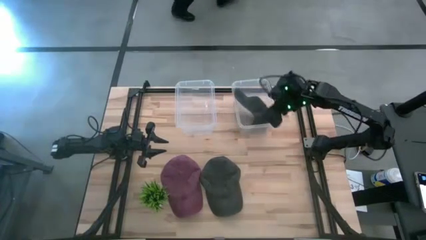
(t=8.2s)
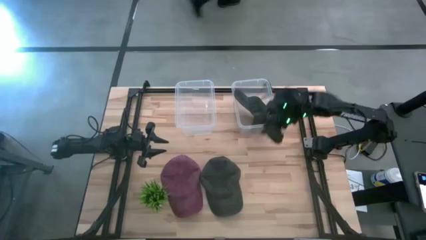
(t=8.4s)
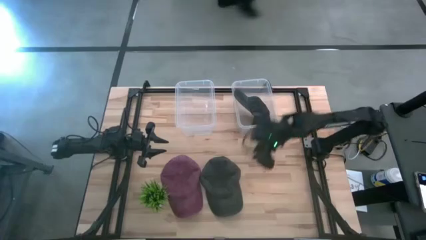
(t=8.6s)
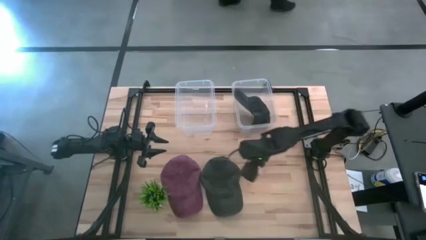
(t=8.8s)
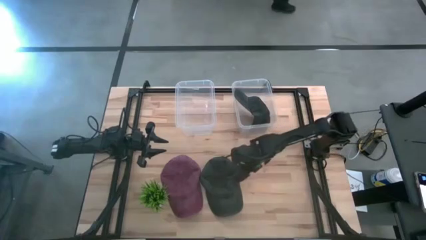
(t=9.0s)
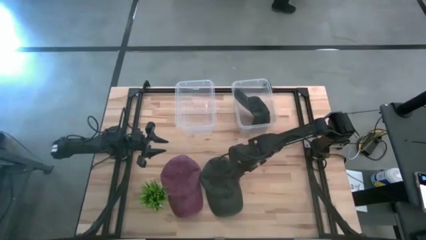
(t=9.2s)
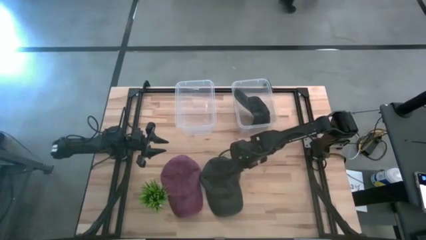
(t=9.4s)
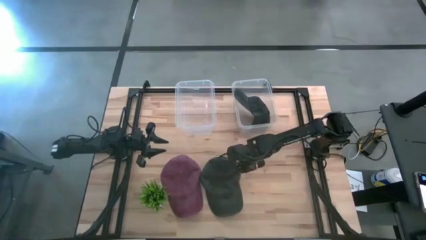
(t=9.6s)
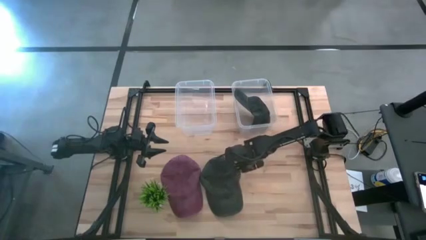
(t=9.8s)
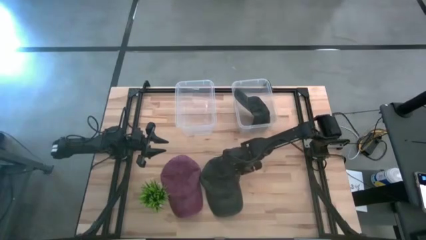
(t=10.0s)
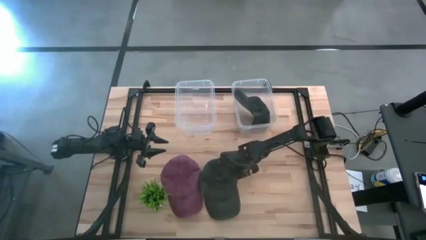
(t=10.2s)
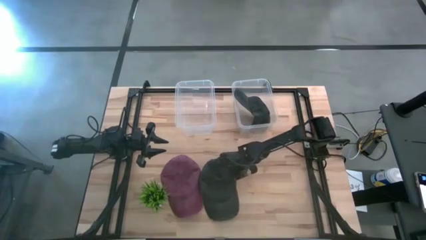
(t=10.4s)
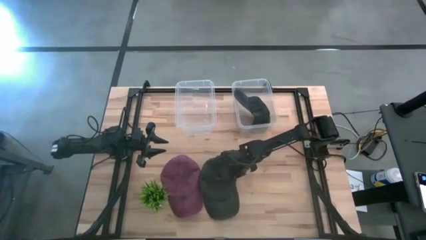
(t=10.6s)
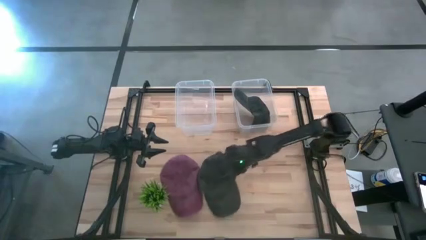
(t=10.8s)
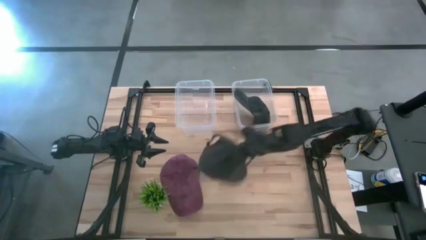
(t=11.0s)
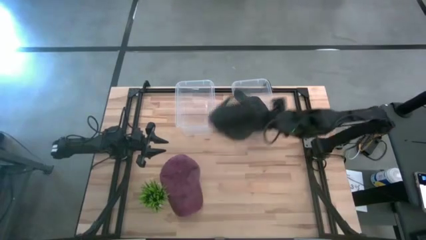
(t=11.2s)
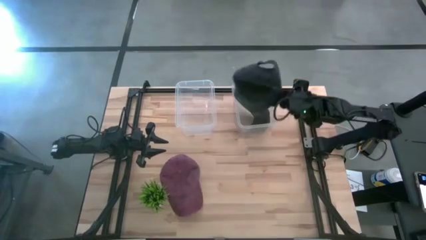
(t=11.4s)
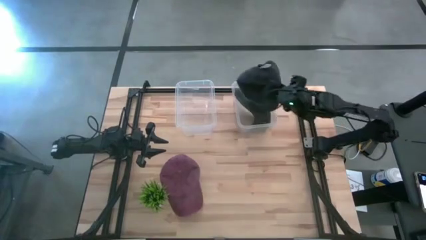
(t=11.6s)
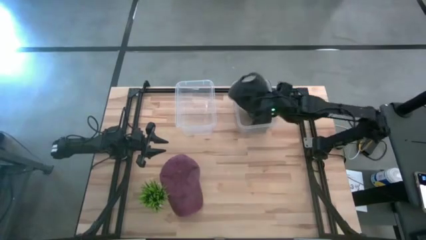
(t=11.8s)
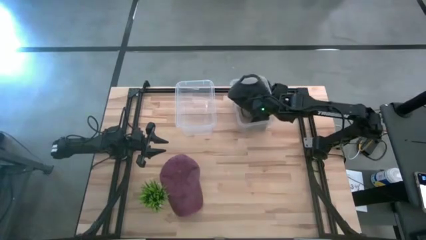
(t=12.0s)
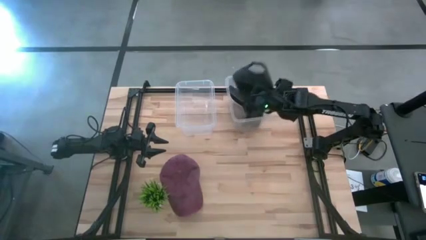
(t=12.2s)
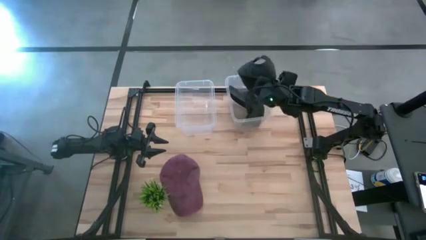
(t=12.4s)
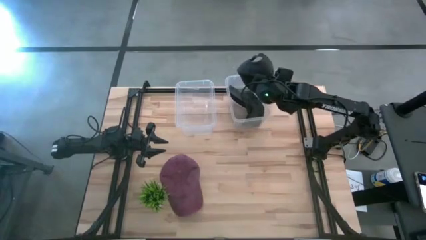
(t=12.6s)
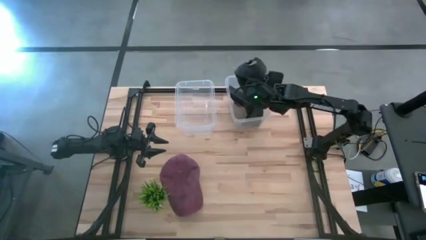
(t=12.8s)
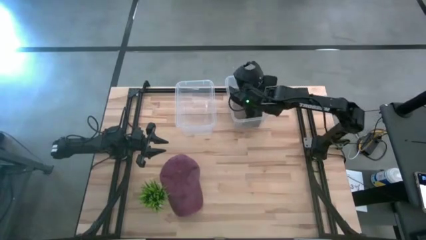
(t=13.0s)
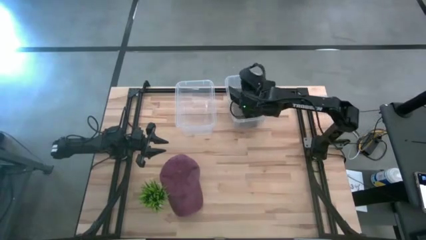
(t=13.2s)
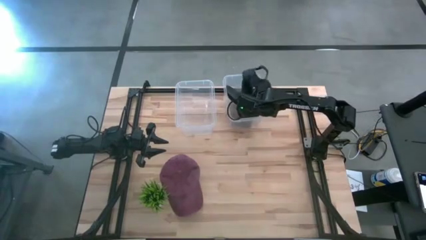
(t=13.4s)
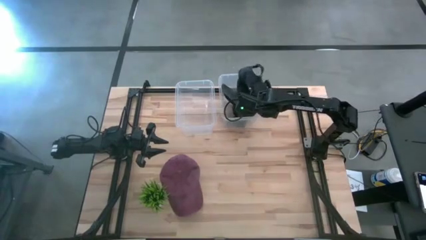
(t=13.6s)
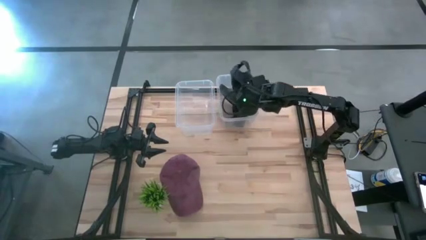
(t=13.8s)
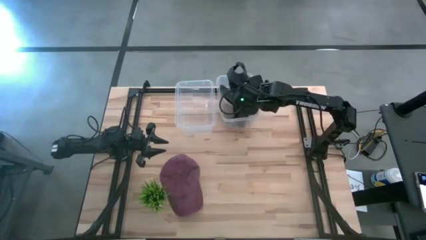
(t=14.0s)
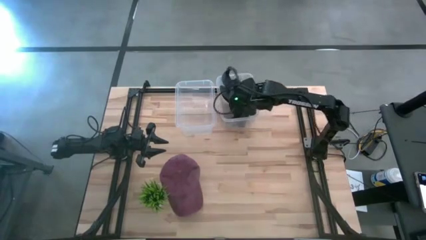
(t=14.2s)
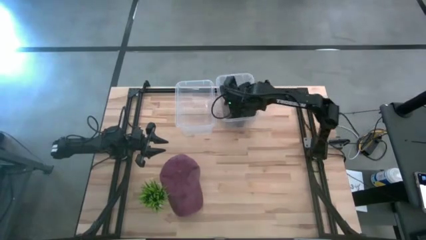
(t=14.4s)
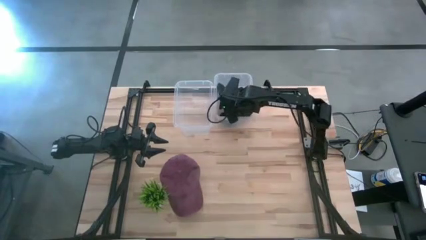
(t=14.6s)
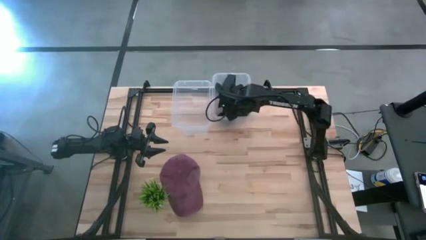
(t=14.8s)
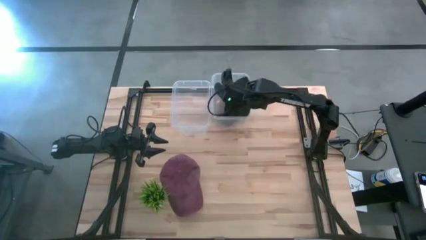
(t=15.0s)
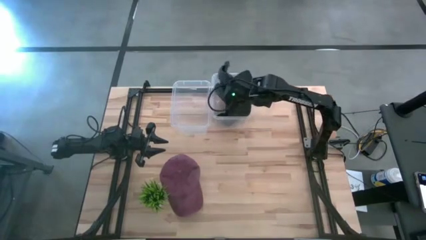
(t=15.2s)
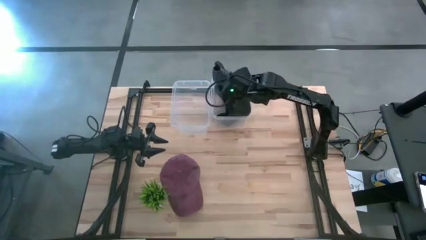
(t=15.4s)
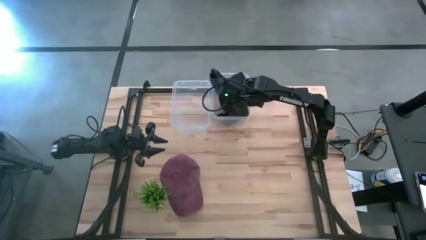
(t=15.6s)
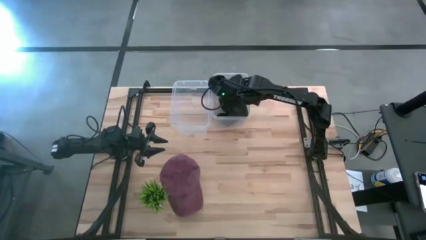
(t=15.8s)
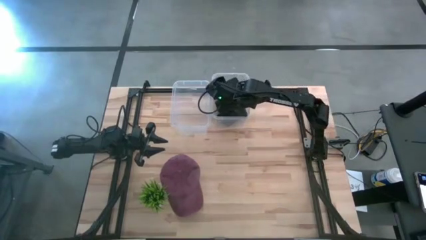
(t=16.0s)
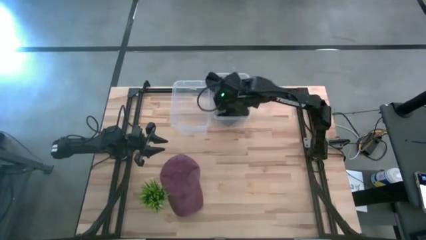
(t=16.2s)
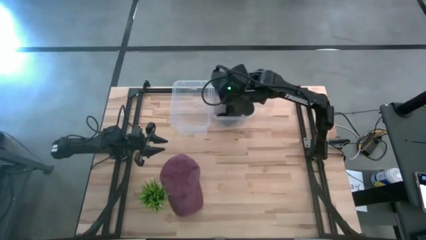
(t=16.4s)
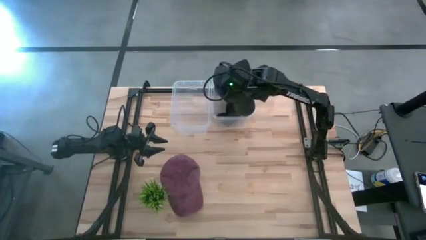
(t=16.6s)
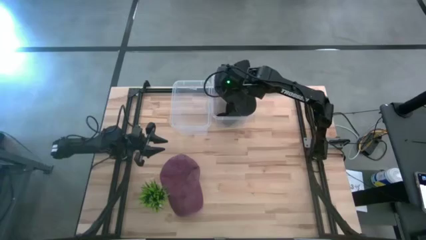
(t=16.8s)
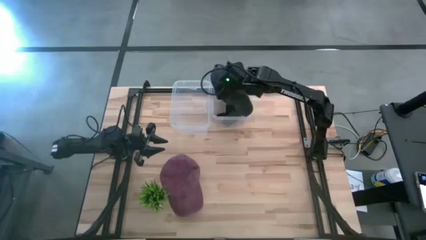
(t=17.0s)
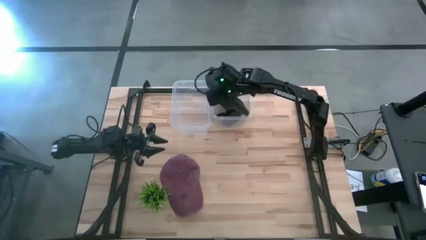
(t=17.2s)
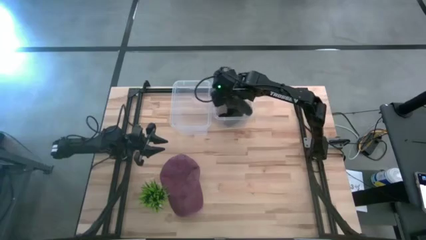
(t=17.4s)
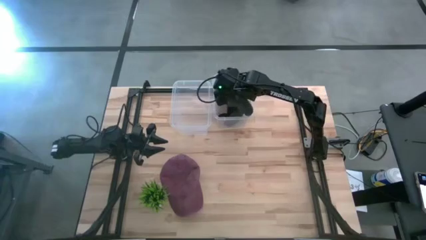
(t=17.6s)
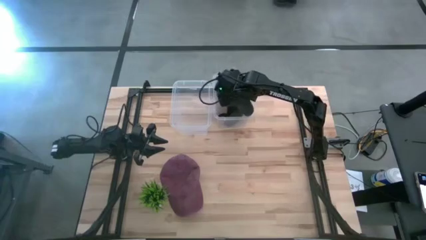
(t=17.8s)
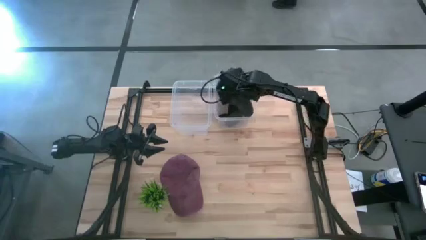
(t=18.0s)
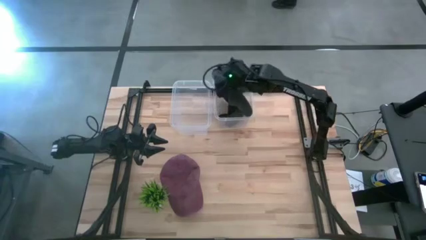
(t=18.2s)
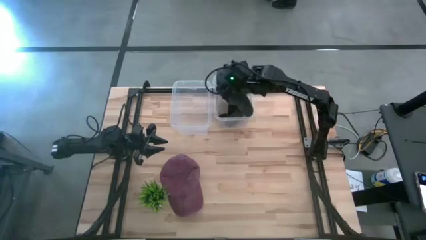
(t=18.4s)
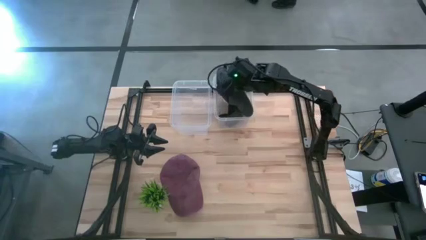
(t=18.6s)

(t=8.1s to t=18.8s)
Task: Pick & Place hat
Put the black cap into the right transparent bin

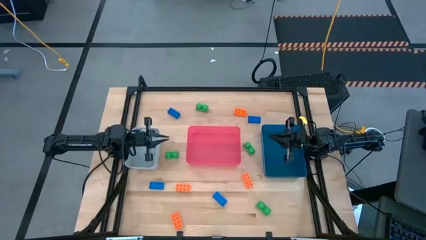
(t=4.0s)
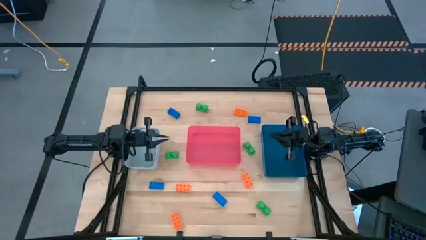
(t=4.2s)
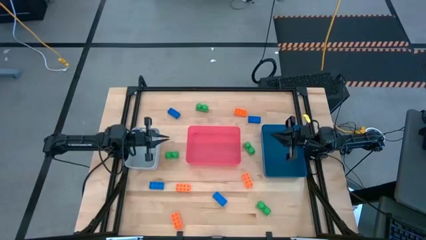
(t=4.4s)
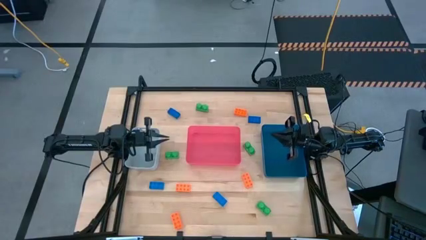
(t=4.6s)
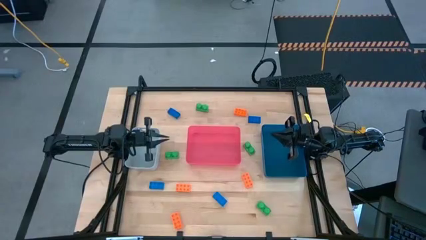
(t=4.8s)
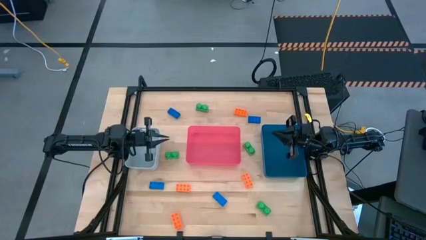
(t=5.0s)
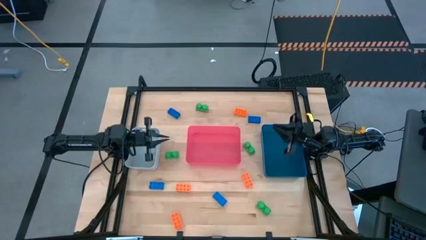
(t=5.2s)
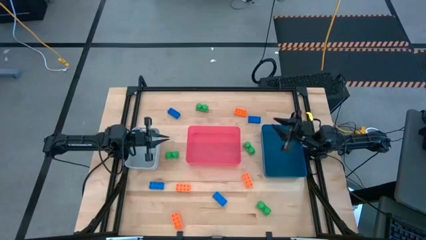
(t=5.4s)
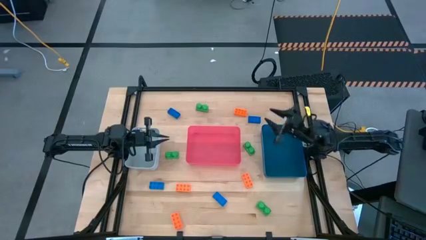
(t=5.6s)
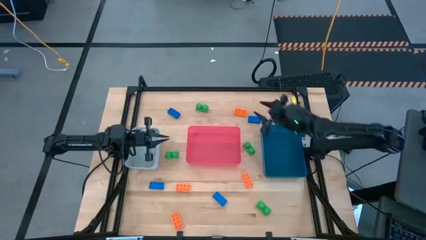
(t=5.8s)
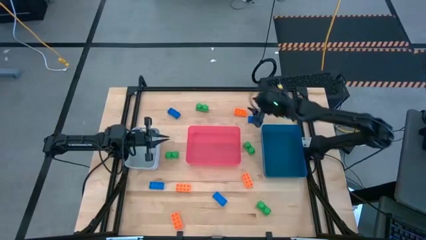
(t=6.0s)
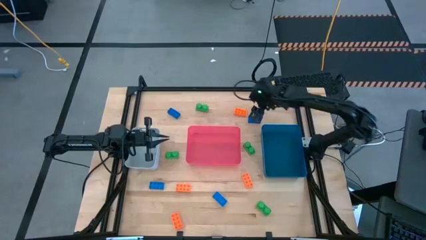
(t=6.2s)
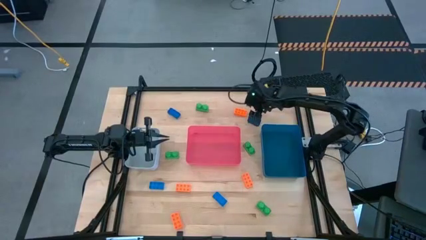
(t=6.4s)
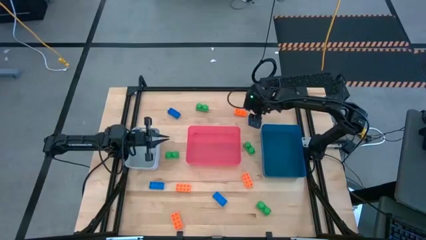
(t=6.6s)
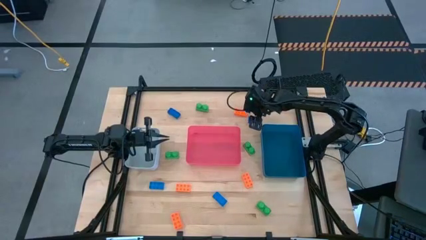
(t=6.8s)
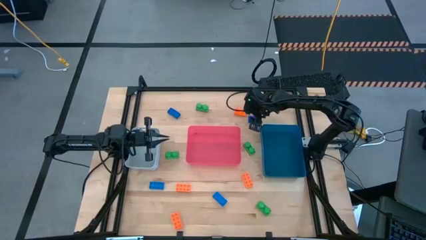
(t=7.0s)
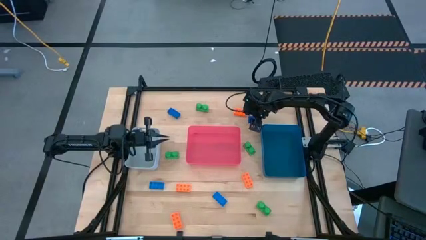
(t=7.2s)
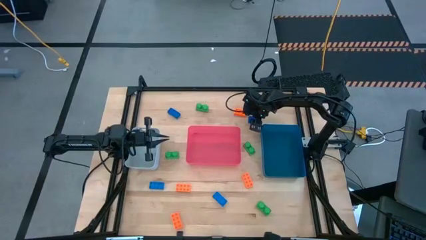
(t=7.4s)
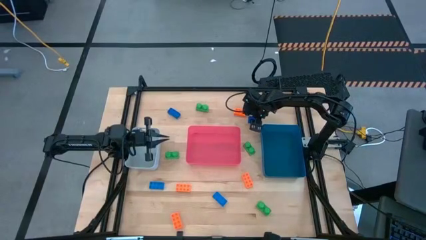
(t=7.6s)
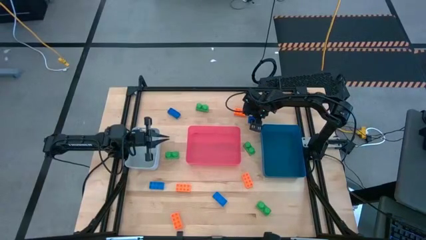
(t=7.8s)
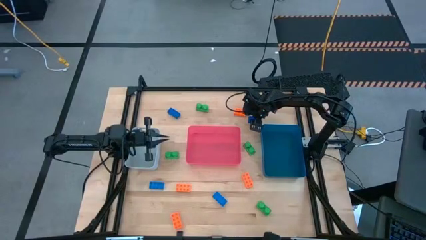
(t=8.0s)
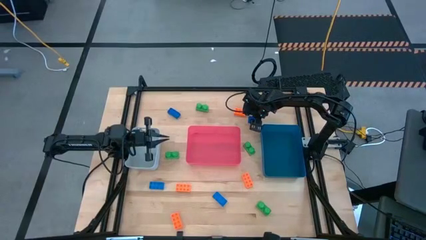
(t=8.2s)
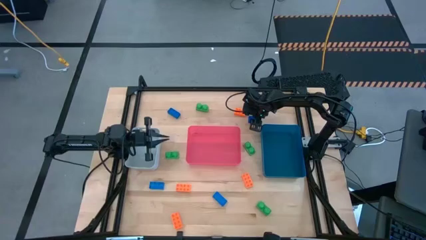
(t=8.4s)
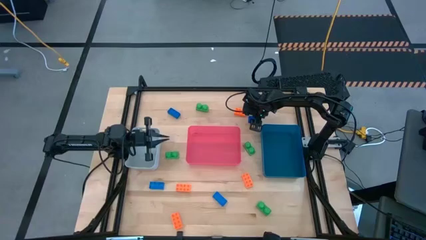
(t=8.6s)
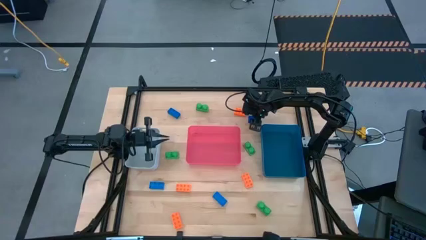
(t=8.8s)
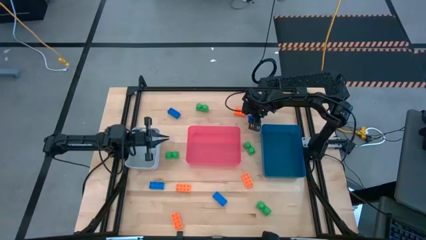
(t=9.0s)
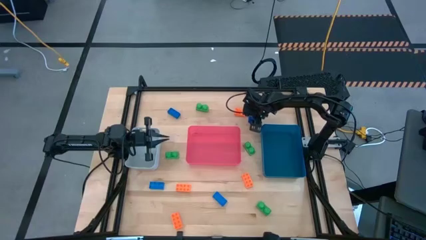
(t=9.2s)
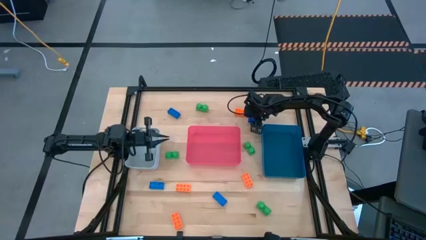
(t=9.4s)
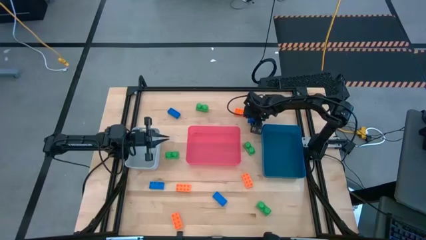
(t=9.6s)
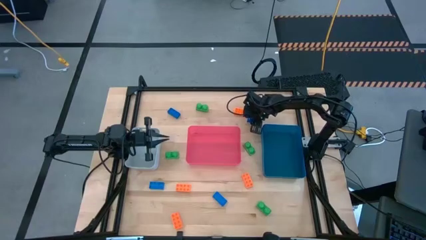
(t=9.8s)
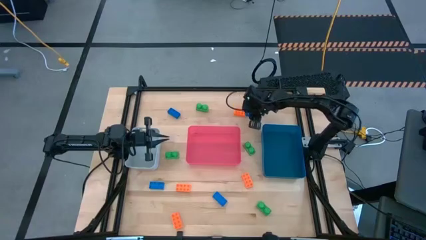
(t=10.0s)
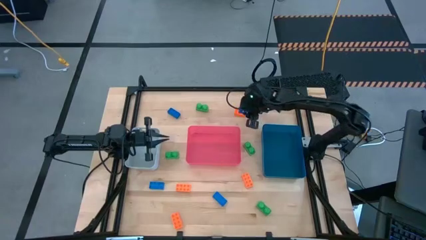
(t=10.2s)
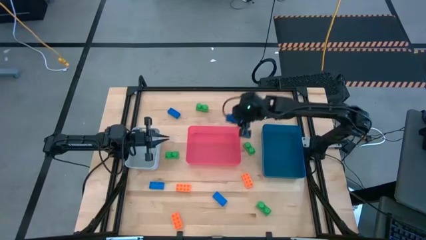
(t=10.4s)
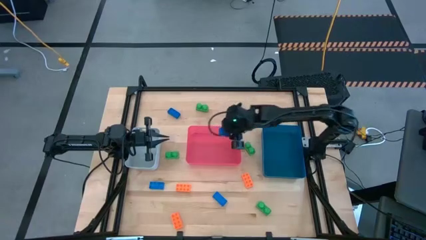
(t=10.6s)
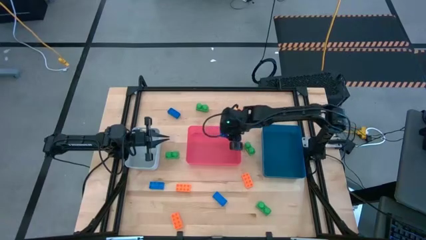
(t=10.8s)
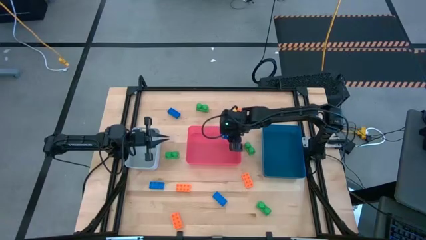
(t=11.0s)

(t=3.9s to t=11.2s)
Task: Sort & place blocks by color
Put the blue game piece into the red bin
